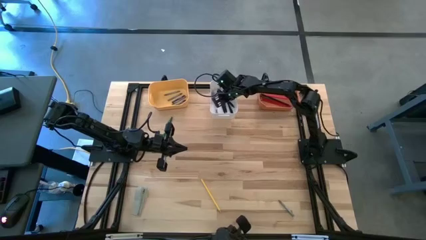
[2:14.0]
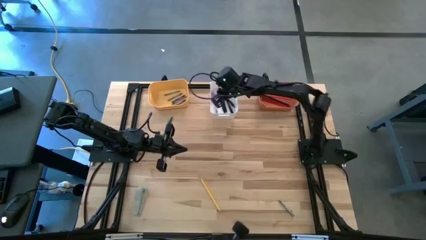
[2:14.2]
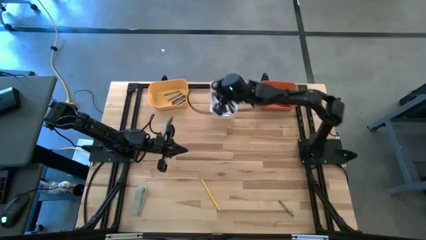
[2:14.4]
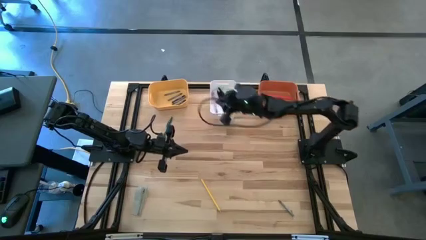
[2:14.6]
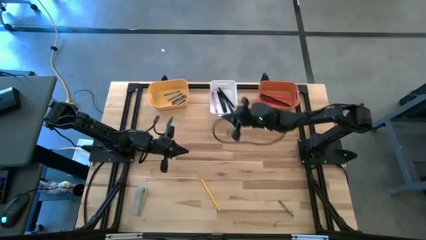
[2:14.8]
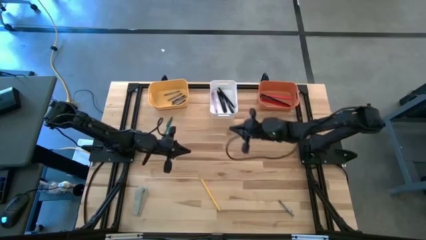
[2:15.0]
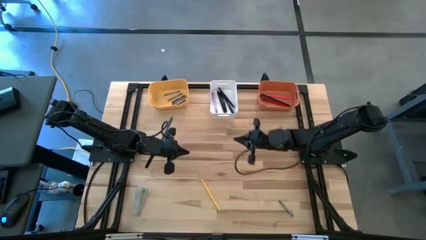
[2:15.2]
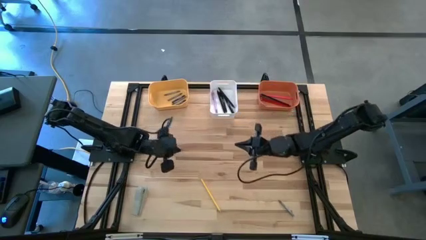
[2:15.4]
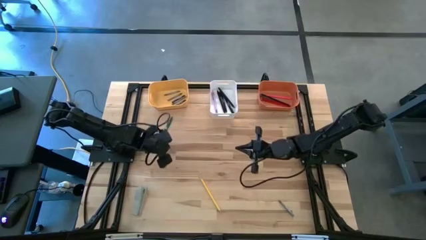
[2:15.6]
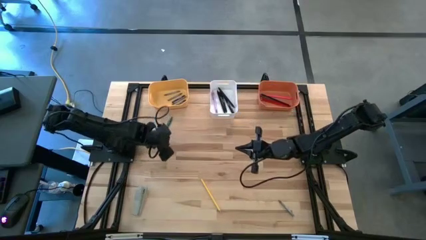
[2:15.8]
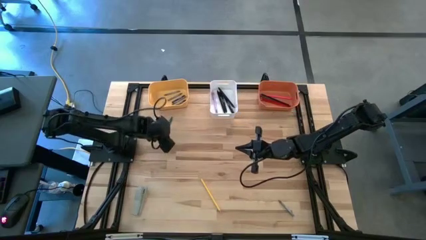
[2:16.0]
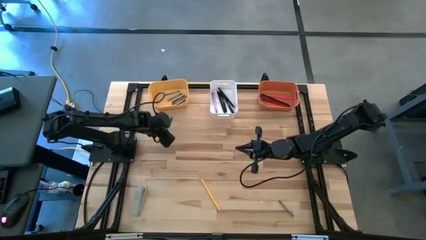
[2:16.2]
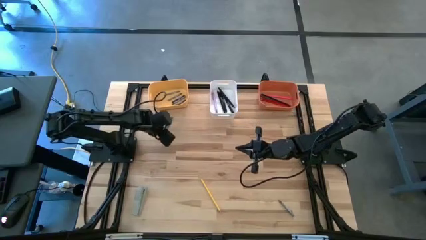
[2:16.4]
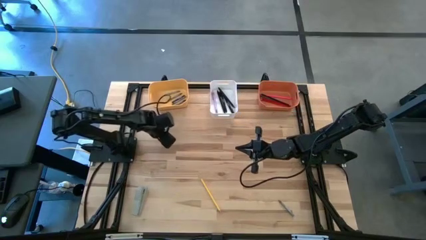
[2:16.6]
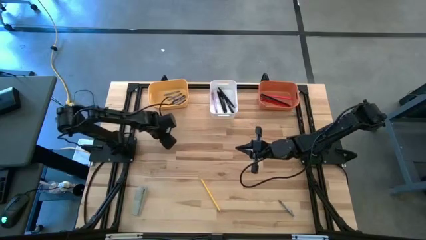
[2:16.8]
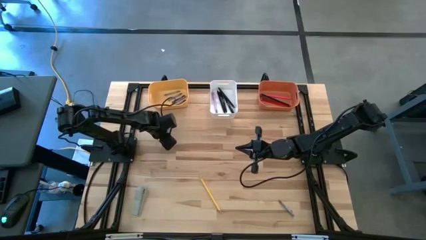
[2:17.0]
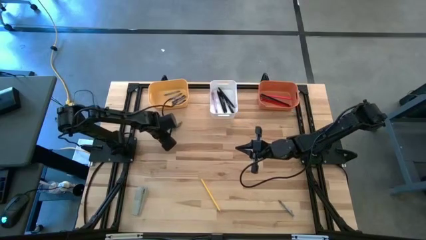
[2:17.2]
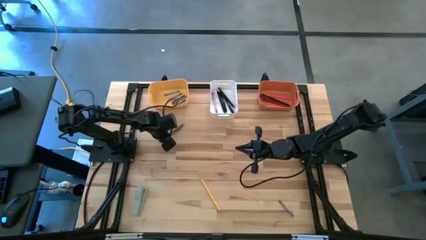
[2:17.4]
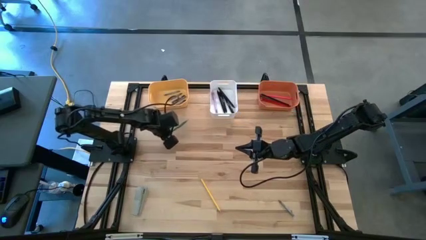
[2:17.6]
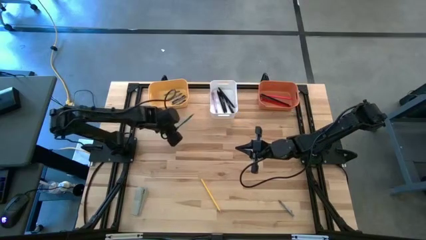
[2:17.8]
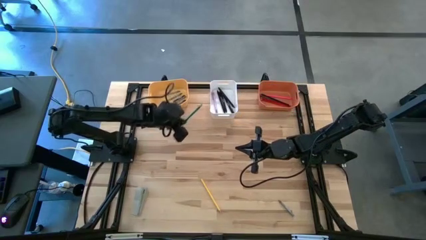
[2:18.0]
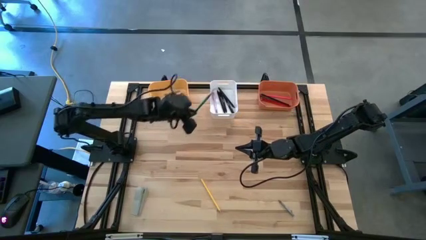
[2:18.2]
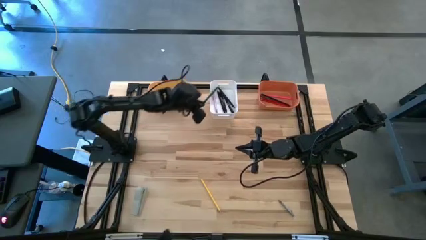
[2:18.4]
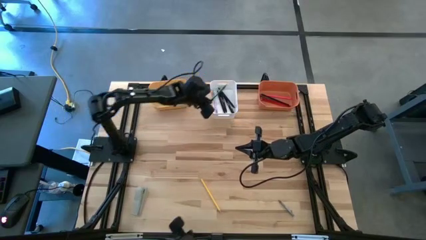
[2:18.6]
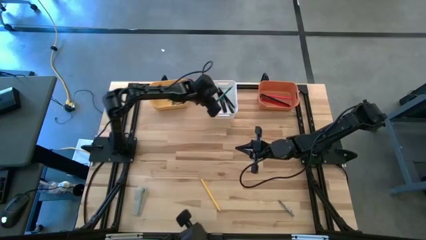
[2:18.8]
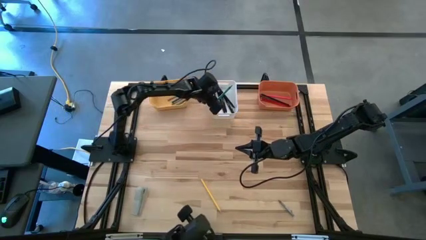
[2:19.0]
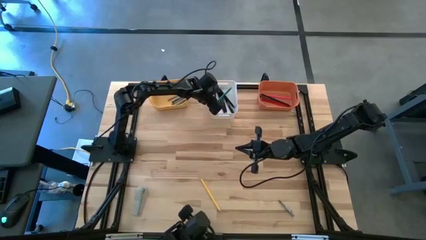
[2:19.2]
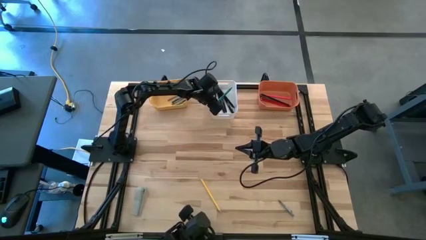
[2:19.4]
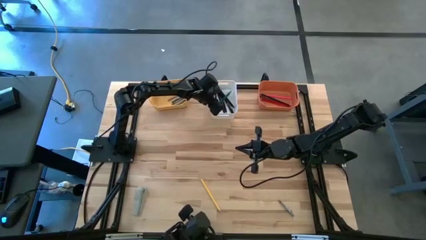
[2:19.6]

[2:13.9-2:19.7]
Task: Sort crayons/erasers/pens/pencils in bins
Put the green pen into the white bin

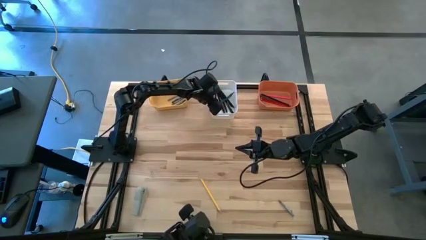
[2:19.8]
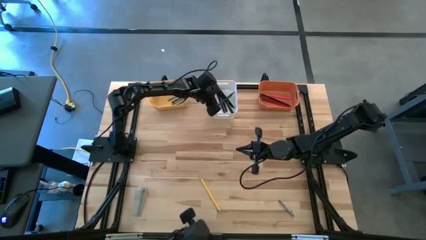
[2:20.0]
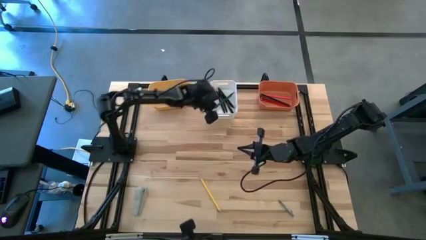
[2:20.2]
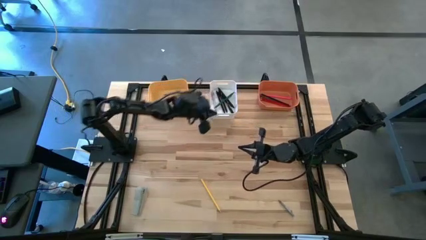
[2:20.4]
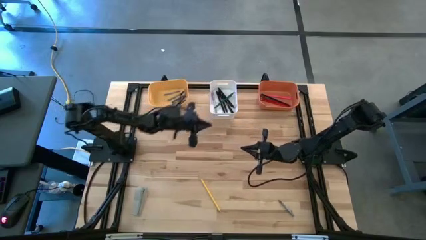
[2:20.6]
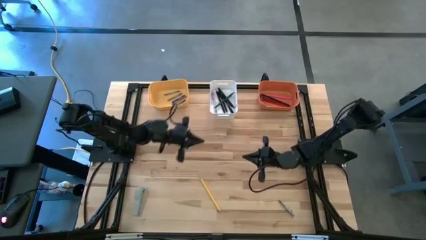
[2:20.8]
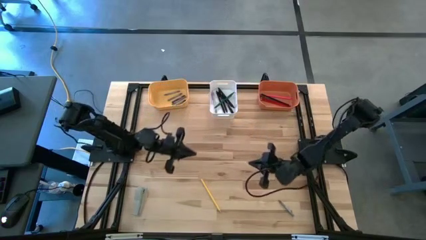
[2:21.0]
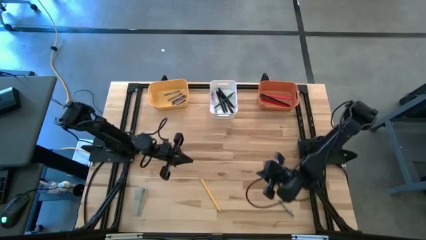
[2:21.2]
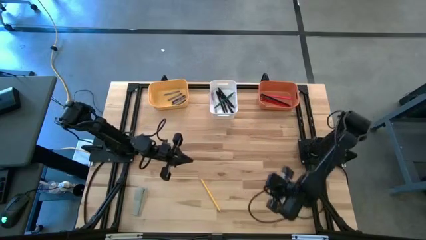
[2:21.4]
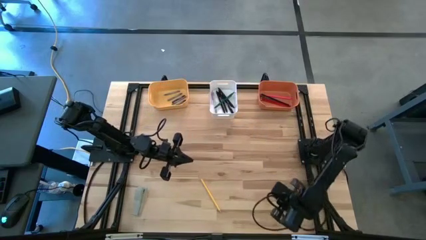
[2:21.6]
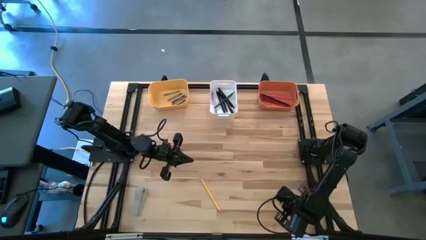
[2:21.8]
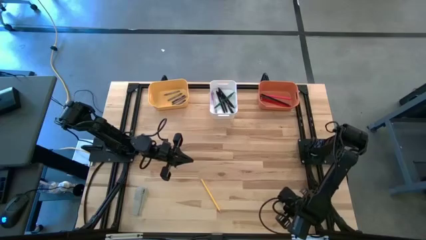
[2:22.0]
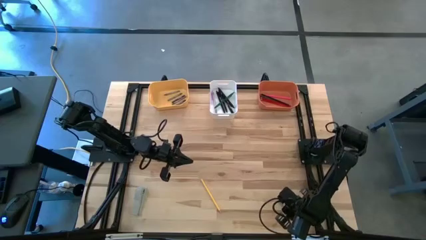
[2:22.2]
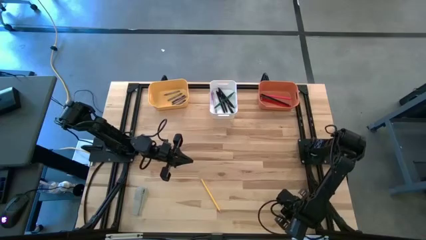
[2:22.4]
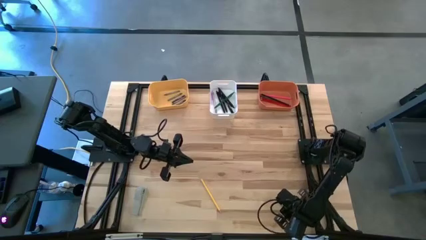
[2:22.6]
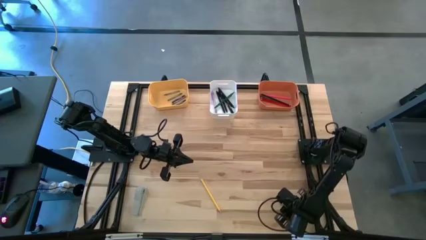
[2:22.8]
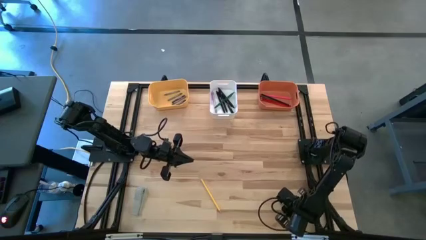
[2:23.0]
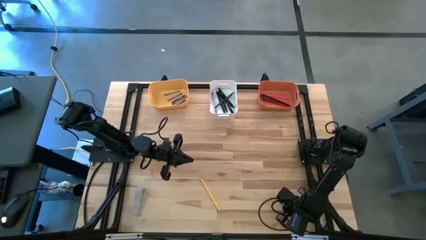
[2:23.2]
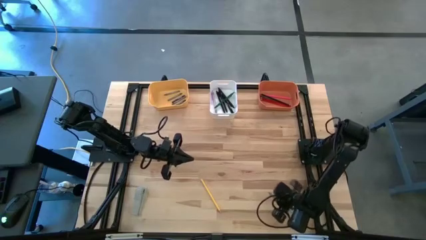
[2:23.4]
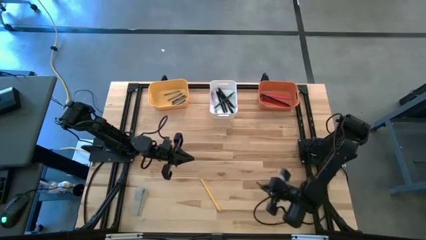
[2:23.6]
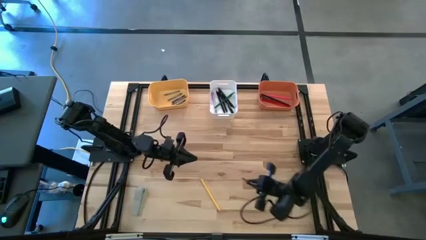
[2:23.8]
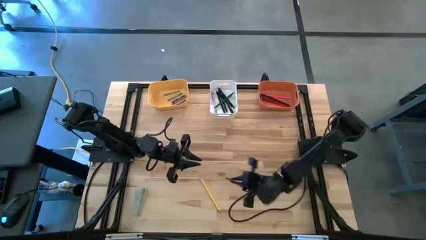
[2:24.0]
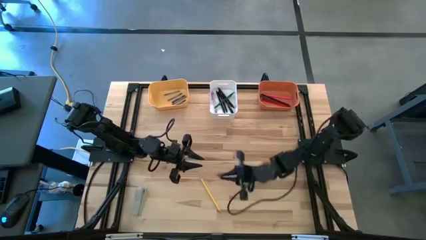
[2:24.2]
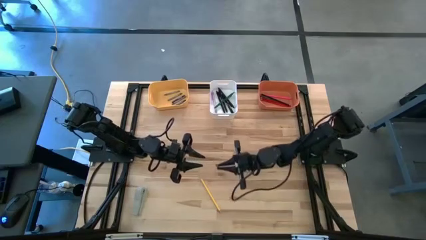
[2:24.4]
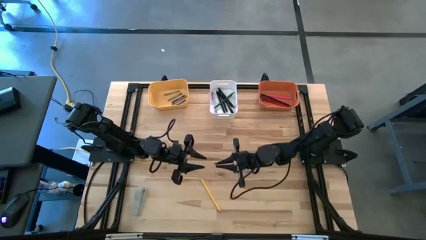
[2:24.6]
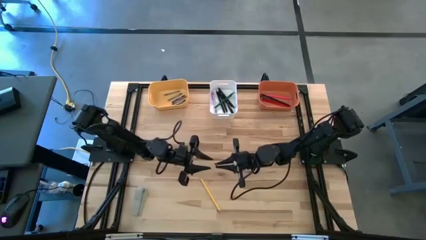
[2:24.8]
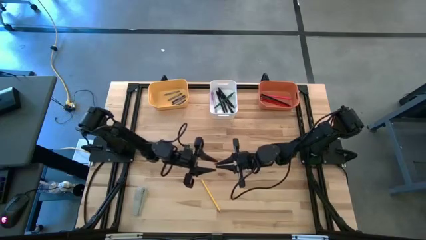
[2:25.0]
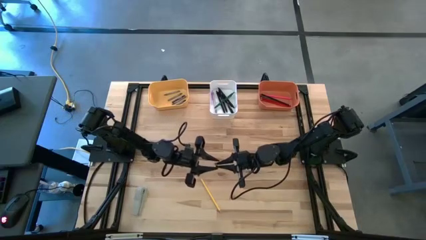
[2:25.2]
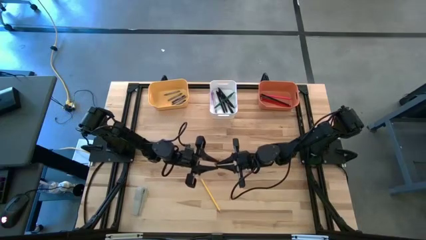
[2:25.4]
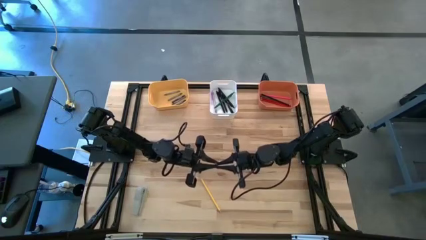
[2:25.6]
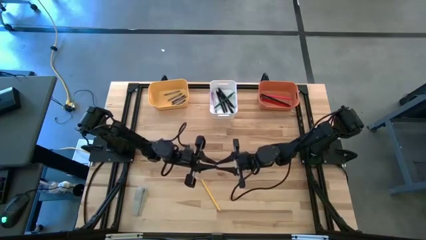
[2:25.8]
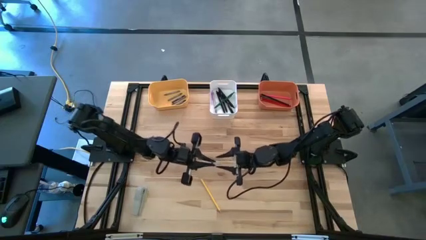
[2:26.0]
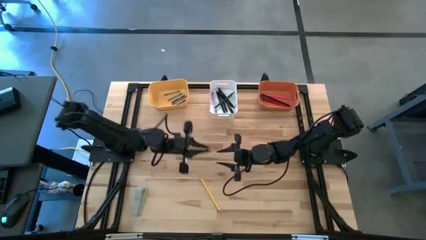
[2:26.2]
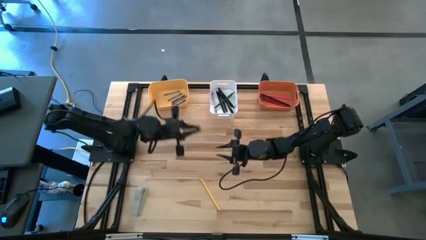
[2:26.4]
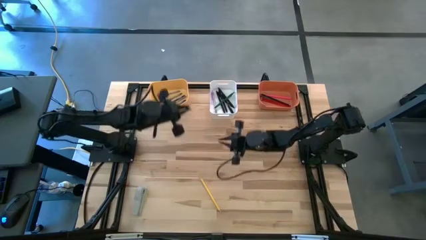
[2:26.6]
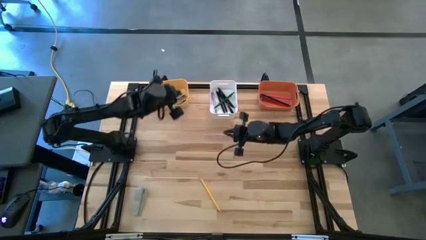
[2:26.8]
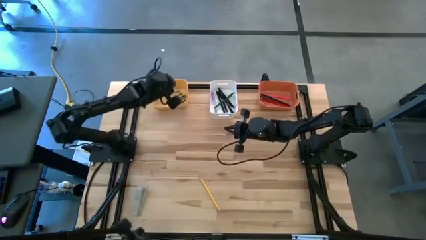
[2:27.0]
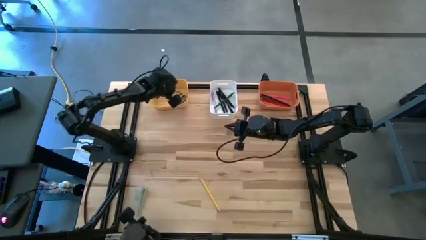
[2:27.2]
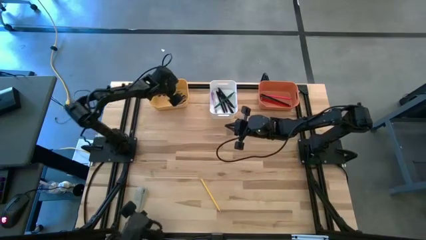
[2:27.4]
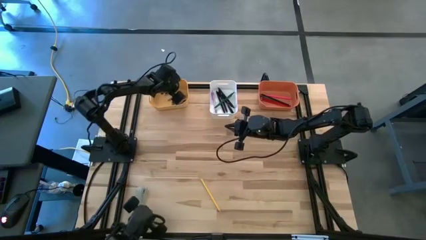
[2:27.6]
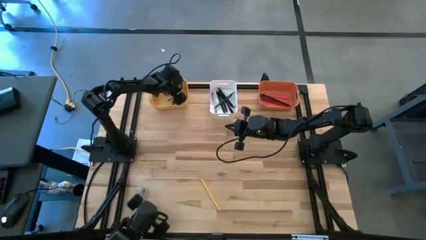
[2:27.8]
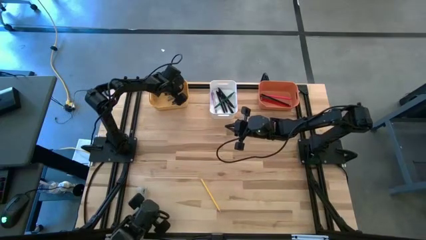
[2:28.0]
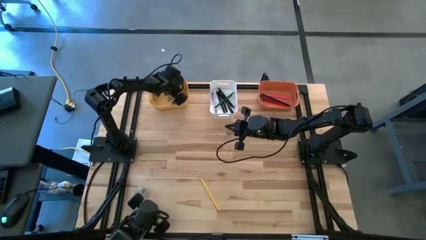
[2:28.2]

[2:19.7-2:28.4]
Put the gray crayon into the yellow bin

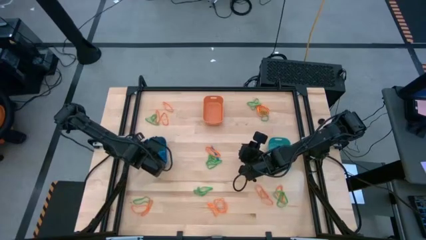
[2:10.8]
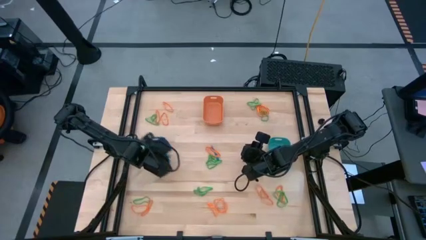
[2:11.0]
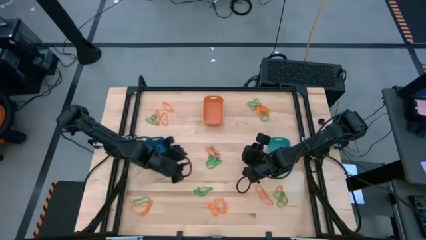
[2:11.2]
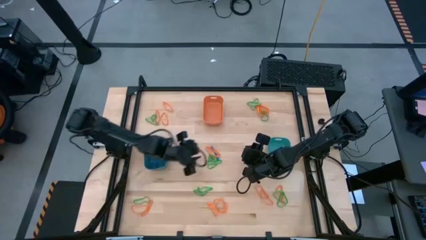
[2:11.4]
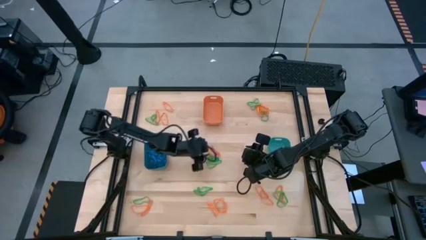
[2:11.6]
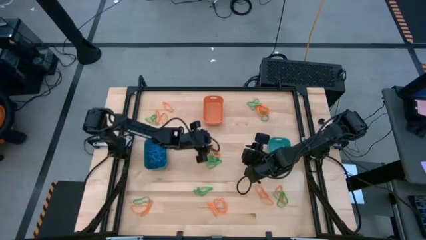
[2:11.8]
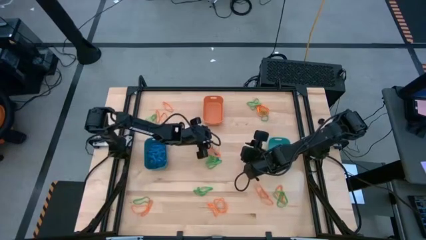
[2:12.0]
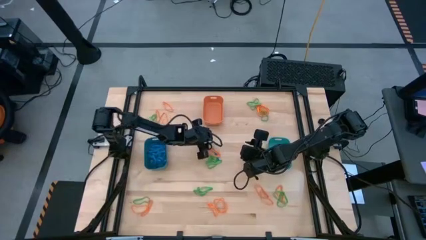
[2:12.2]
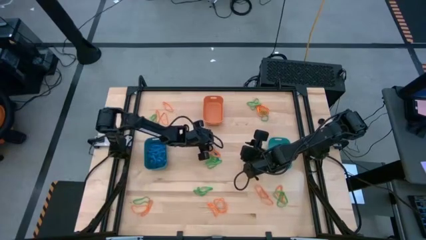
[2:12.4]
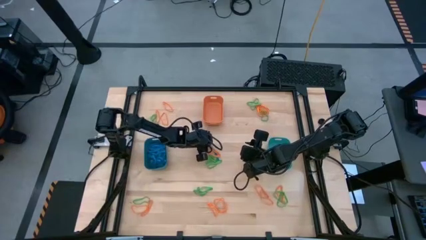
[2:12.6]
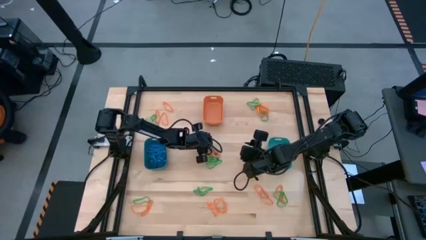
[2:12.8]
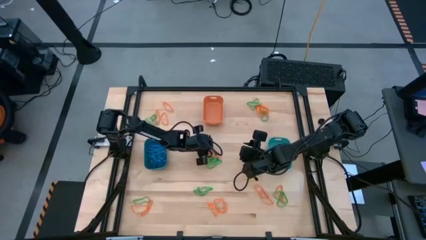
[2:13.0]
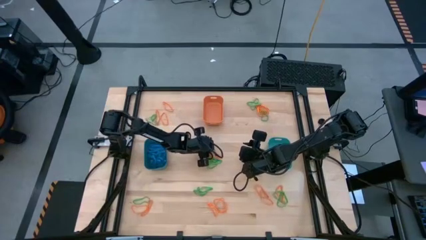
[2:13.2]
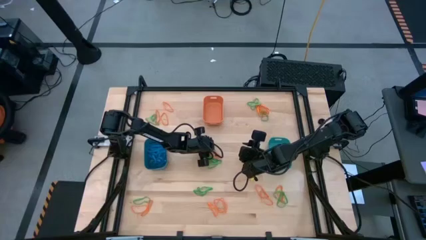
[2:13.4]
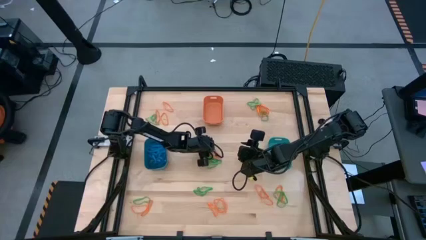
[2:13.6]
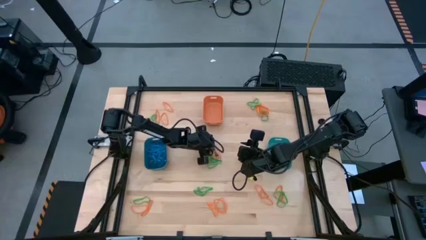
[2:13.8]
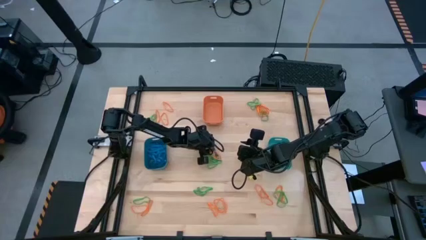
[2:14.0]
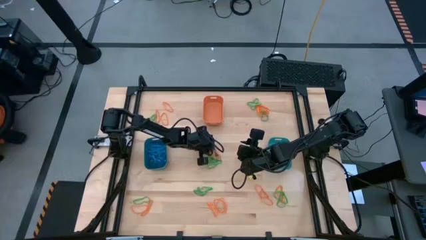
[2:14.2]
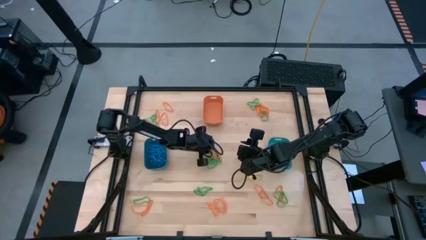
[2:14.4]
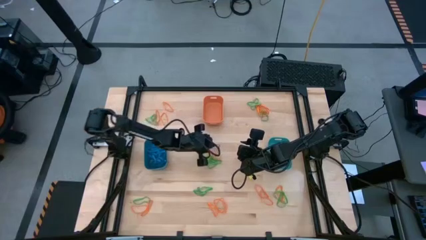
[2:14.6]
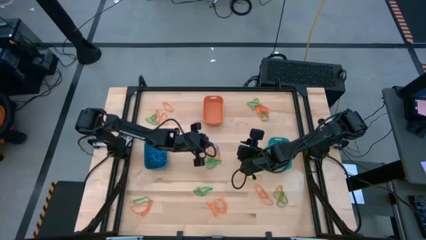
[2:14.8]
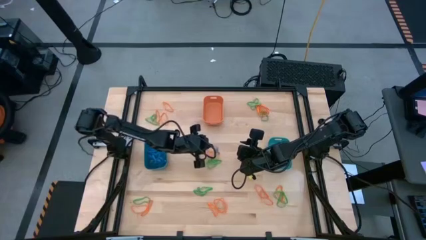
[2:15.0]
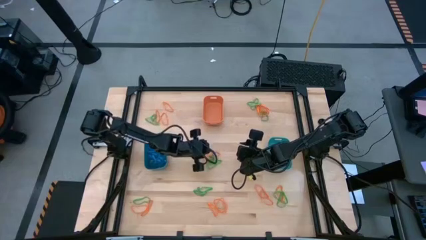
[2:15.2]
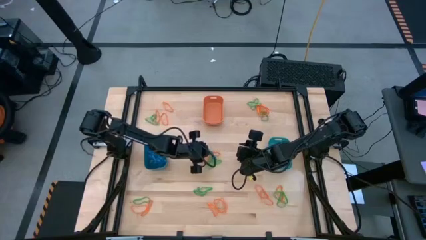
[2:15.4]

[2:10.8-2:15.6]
Task: Sort rubber bands into baskets
Put the blue rubber band into the blue bin
